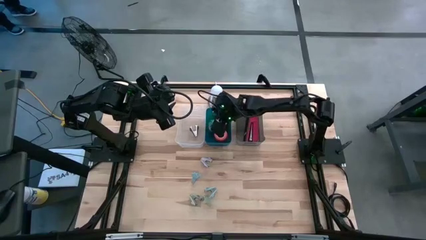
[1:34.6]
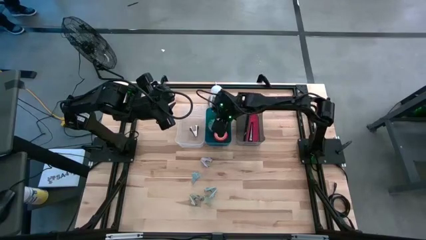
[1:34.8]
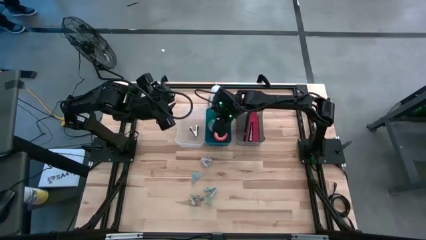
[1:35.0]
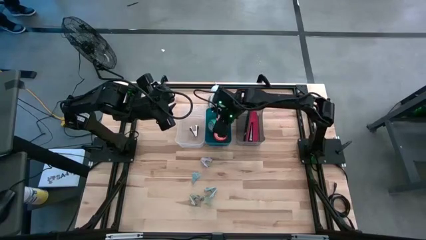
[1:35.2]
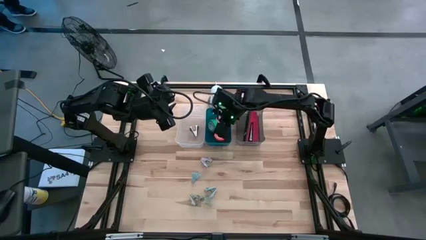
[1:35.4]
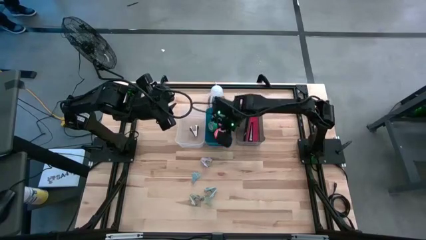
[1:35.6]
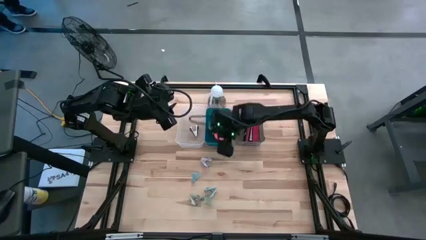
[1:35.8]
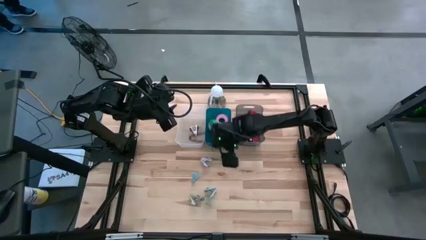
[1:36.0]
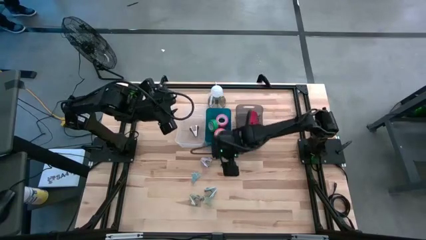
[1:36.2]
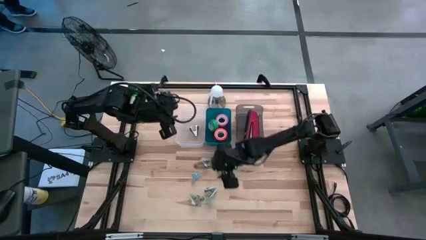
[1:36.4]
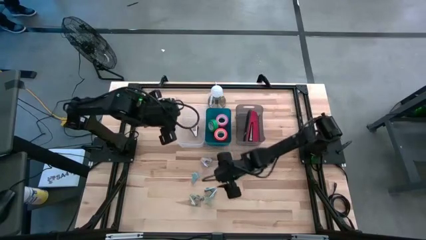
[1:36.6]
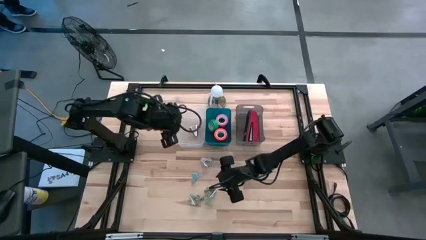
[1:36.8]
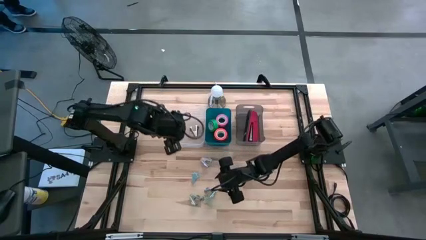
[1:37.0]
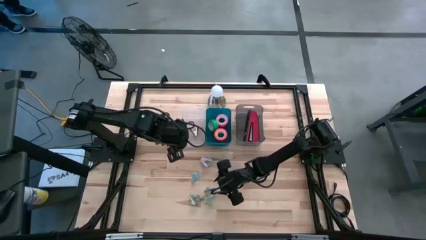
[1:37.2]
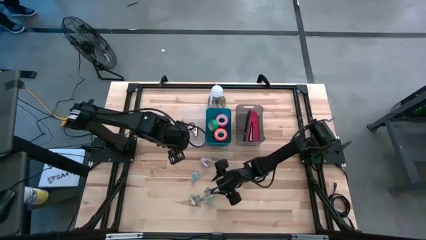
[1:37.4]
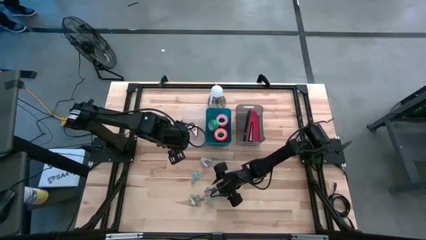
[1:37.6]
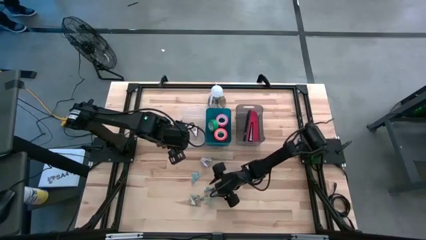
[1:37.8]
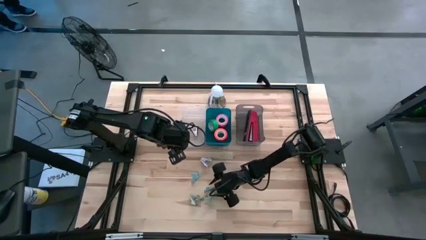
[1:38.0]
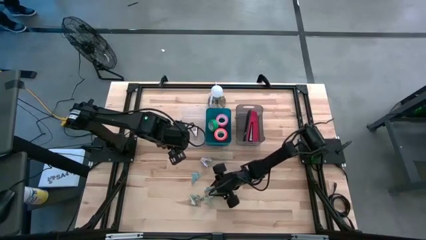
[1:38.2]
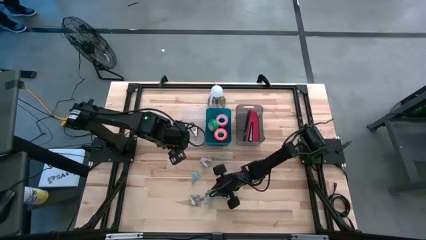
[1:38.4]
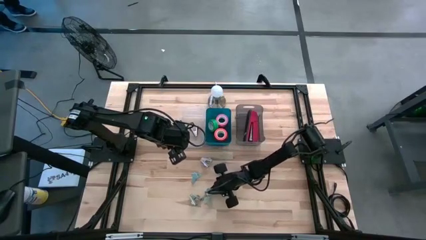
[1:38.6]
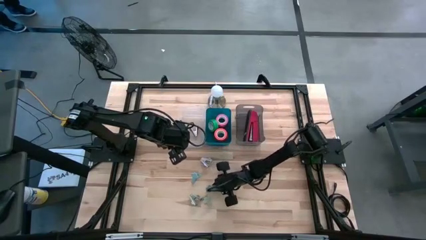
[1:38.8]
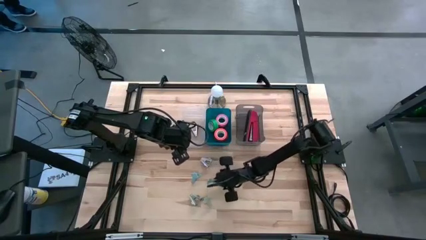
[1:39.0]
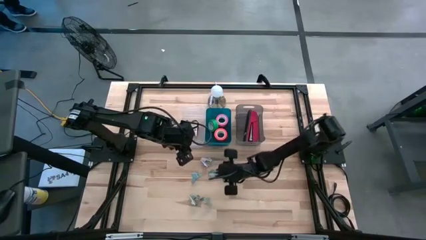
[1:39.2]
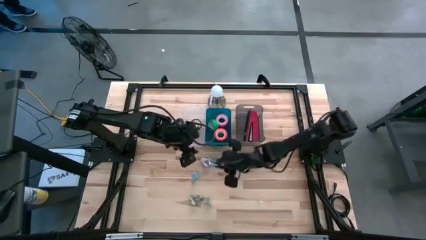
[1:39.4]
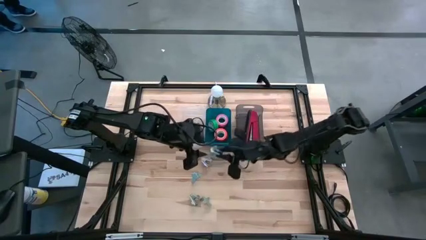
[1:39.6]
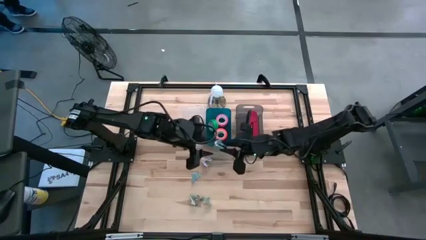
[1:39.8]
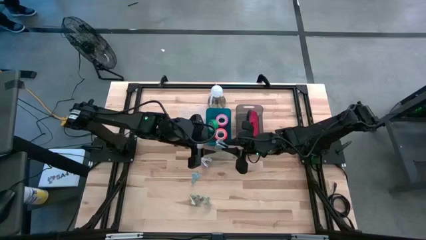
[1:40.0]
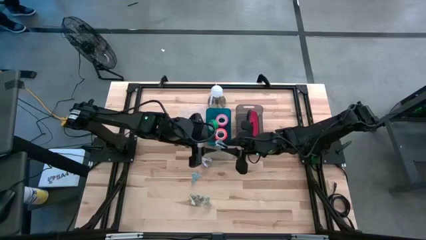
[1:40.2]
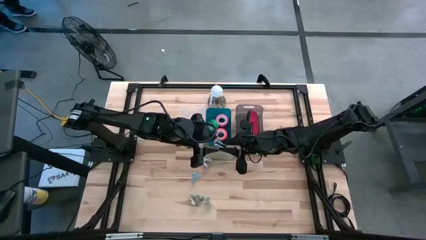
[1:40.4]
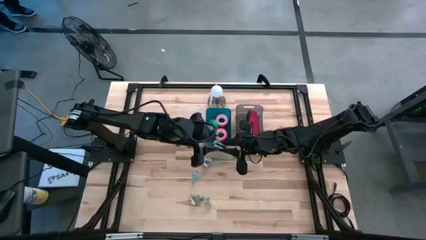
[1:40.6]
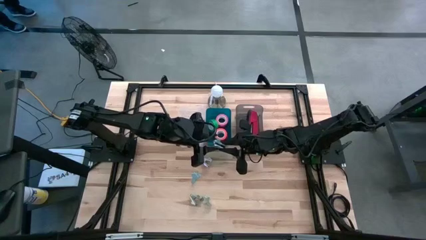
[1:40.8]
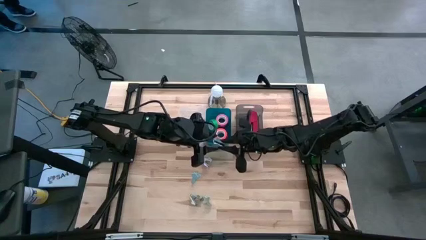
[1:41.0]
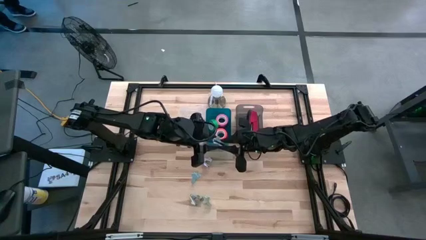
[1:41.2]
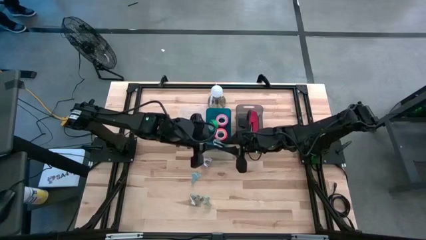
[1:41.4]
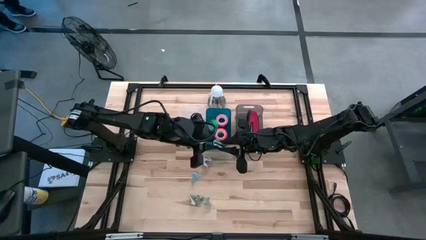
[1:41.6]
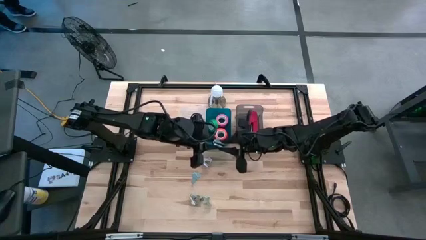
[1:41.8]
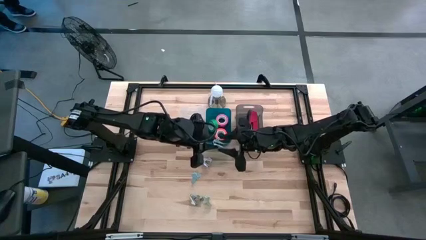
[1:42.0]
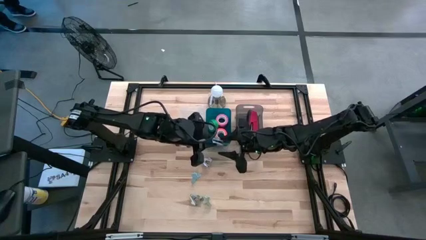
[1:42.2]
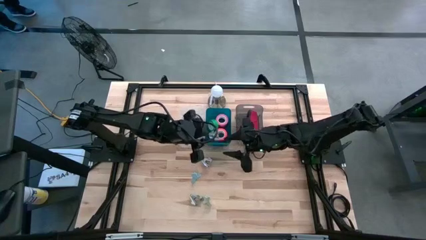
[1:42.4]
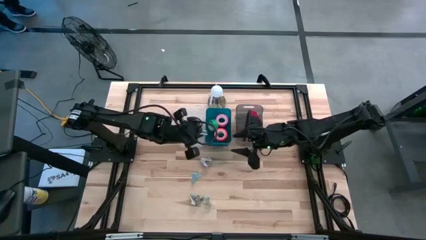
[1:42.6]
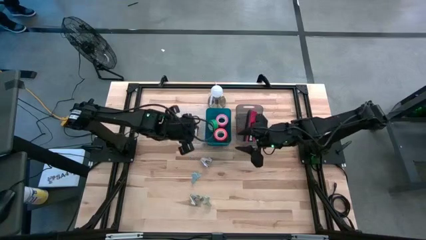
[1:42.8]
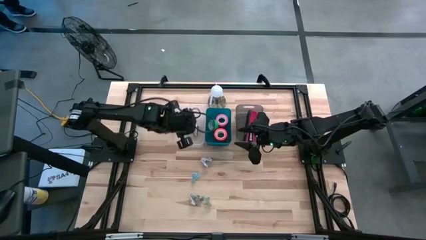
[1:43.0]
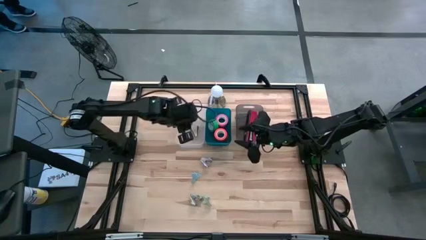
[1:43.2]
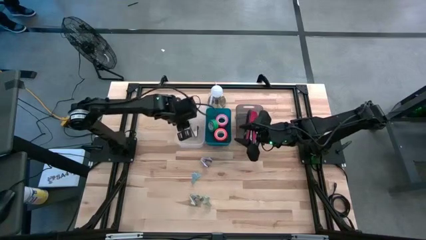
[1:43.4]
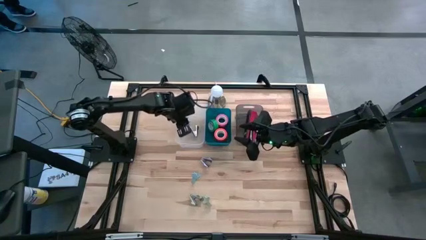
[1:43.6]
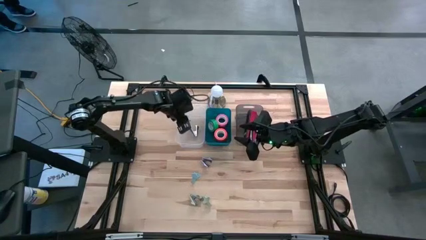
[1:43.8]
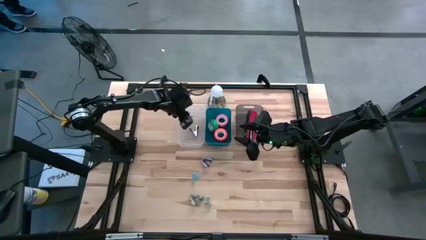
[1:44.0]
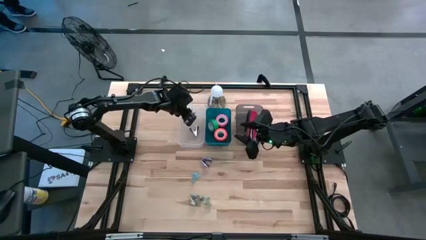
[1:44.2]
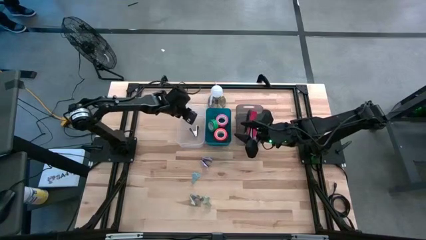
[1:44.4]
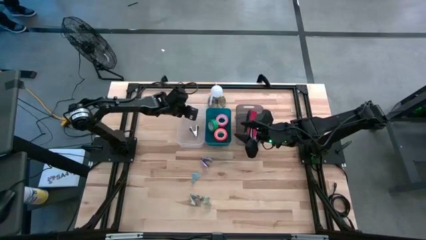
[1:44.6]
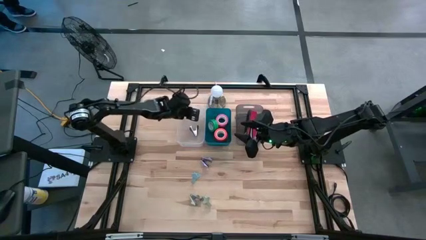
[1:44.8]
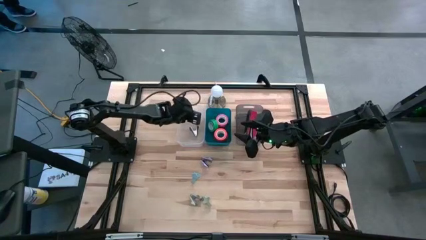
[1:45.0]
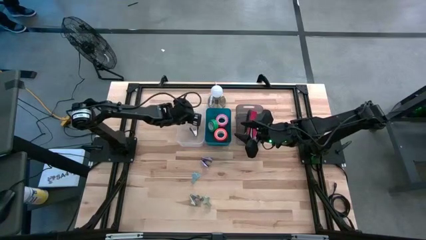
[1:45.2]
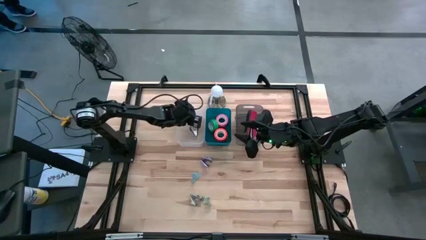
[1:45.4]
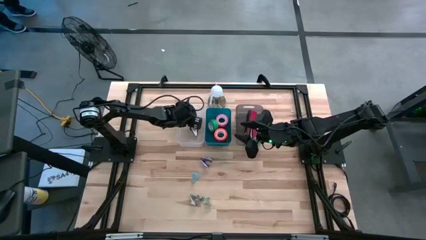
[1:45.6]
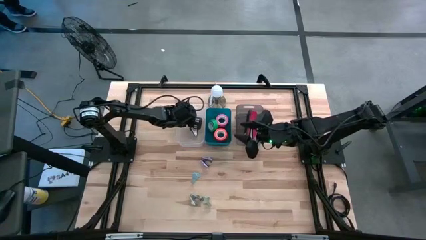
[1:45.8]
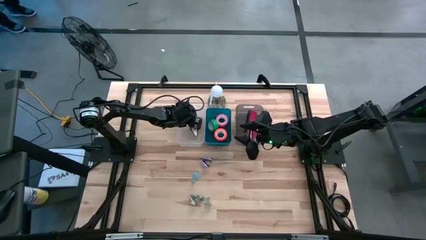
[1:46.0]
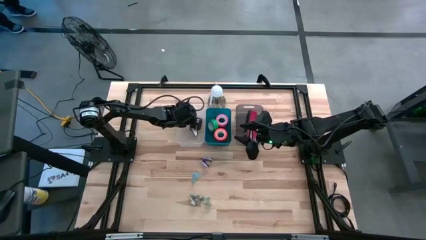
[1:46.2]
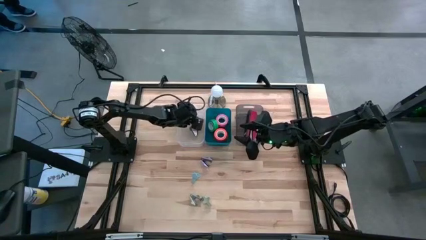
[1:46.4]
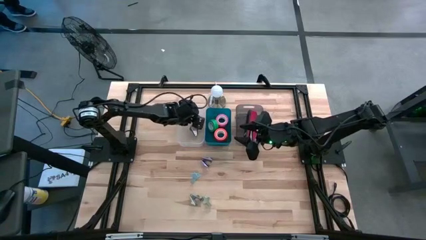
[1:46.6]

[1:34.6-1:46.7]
Task: Pick and place Stapler, Stapler remover, tape
Put the bottom blue staple remover into the transparent bin

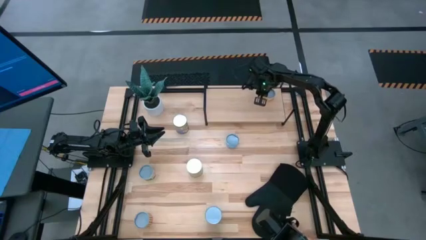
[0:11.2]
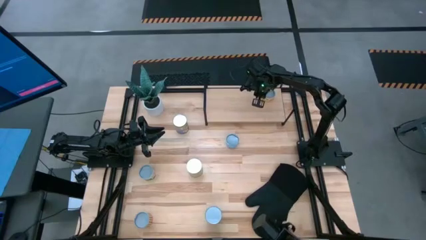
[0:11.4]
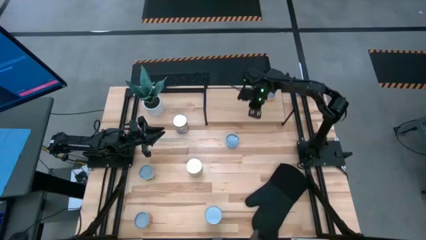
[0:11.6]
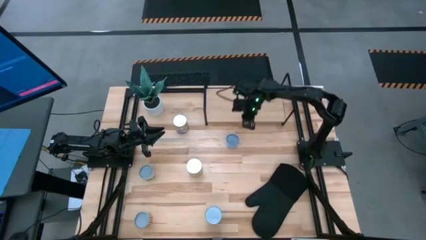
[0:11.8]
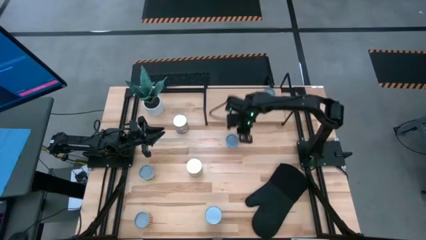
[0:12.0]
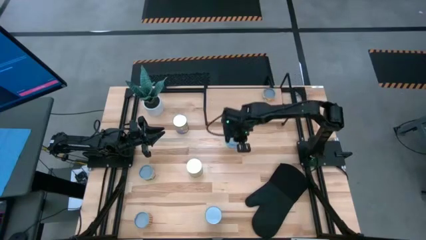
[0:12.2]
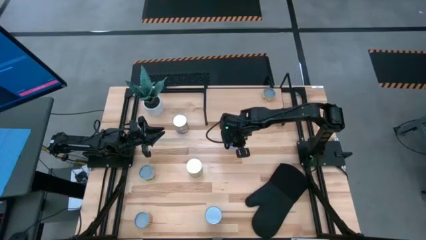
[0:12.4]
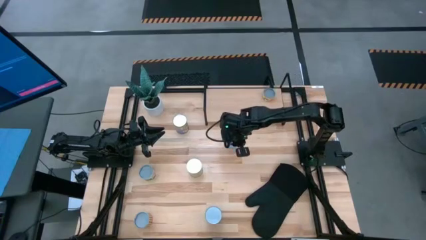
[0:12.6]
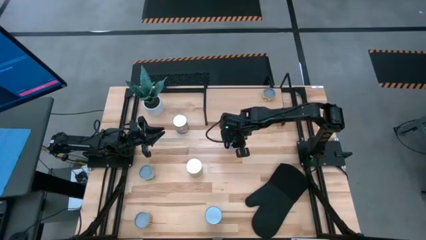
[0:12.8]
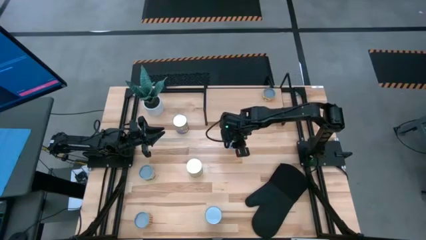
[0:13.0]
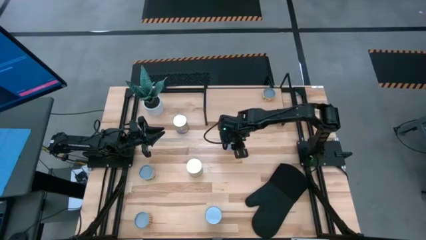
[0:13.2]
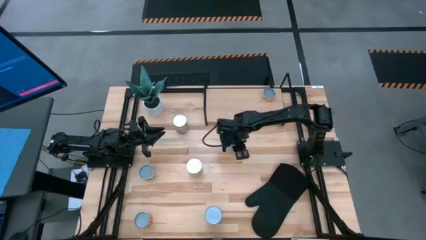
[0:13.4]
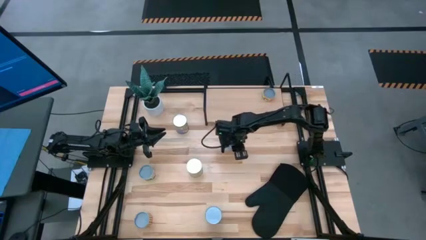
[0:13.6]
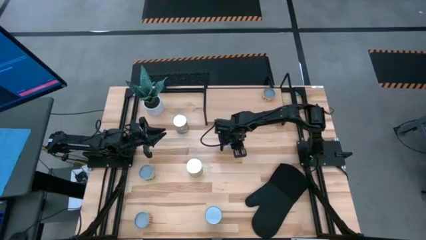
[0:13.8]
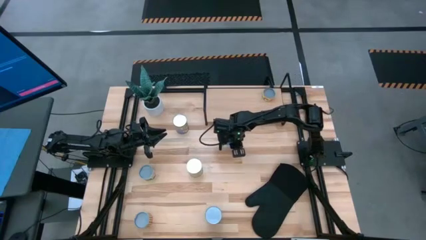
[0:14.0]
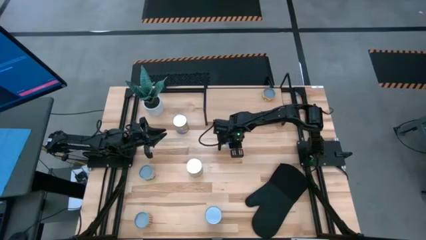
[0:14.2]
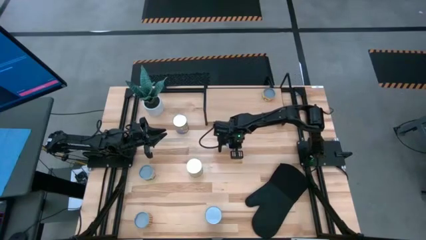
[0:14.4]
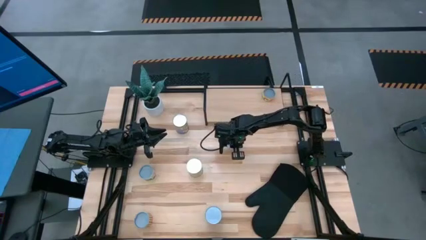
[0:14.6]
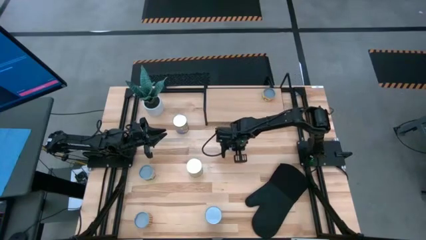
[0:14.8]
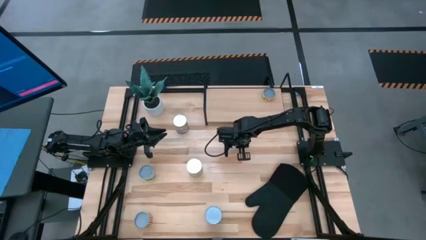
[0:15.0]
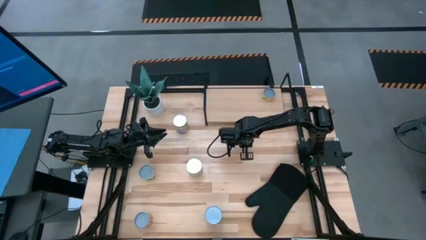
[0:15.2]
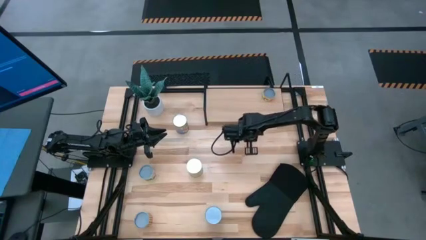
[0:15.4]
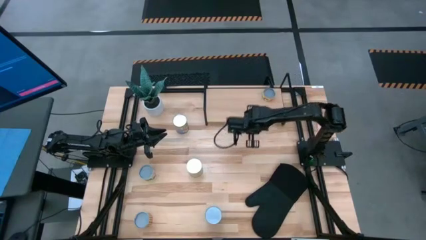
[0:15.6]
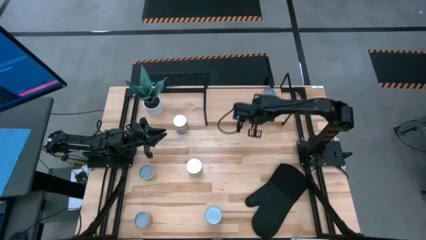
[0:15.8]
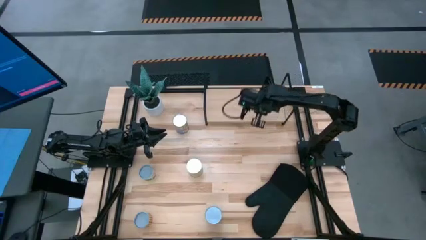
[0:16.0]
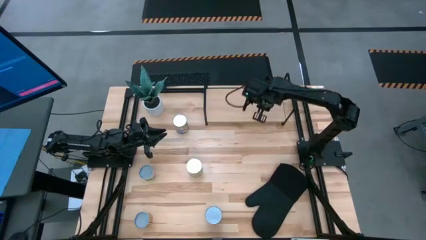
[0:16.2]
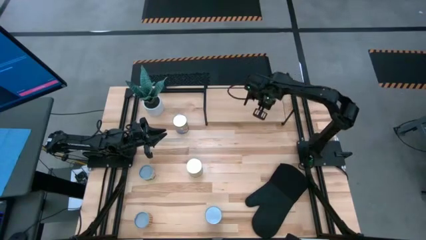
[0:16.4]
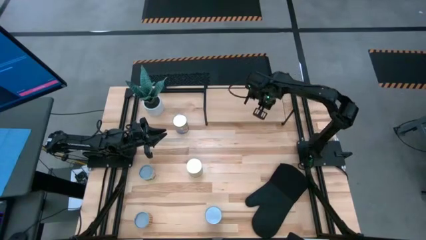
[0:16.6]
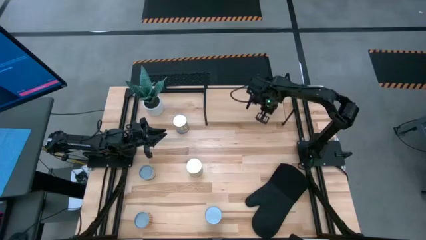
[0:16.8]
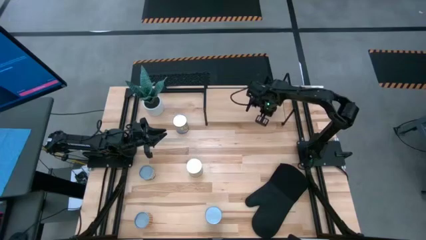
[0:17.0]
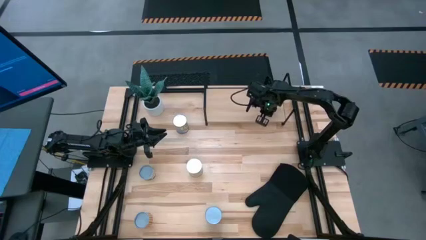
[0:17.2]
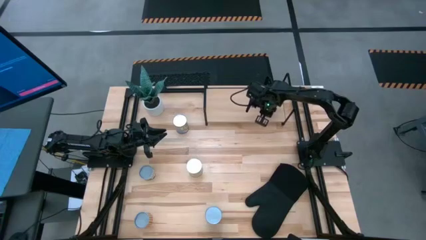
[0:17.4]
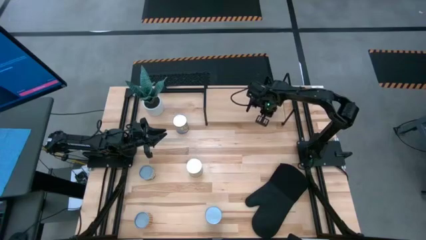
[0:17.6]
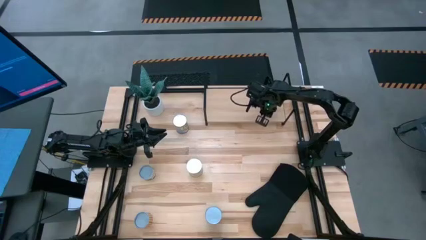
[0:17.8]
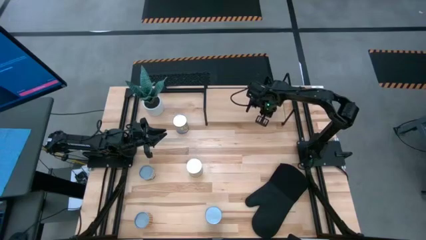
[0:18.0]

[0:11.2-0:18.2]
Task: Pick and place cans onto a shelf
Put the canned salmon on the shelf
